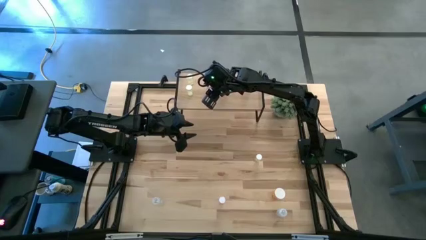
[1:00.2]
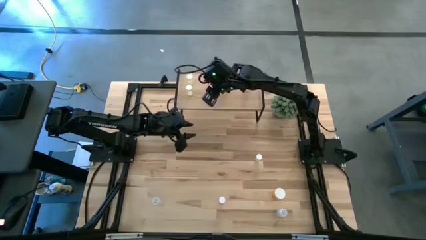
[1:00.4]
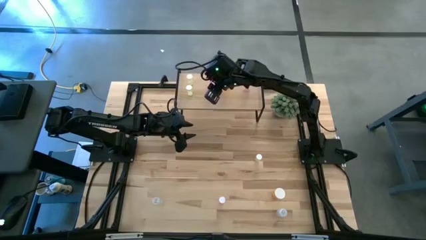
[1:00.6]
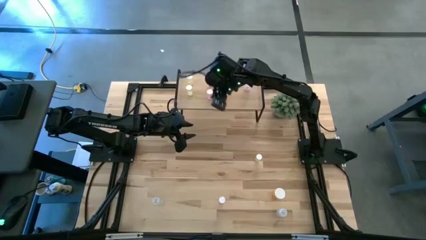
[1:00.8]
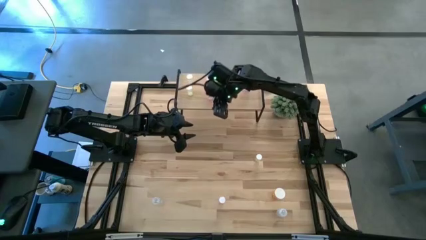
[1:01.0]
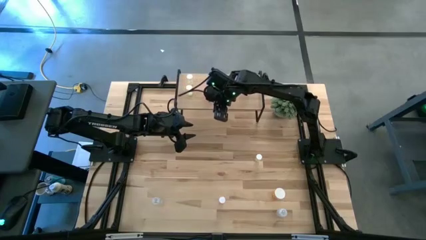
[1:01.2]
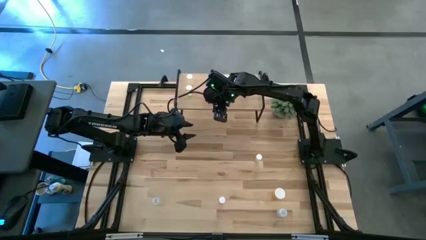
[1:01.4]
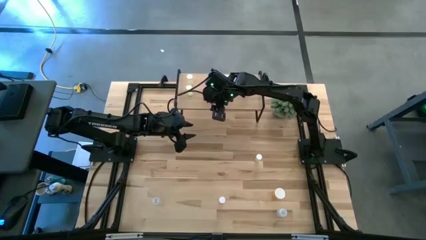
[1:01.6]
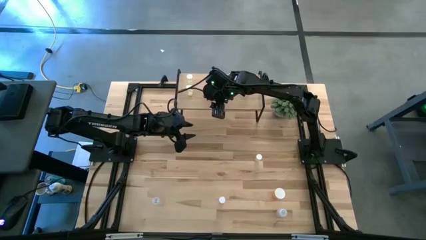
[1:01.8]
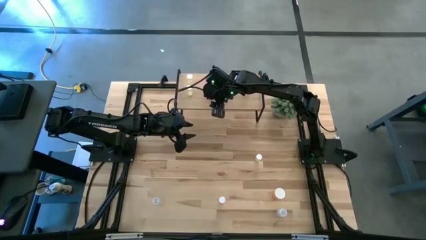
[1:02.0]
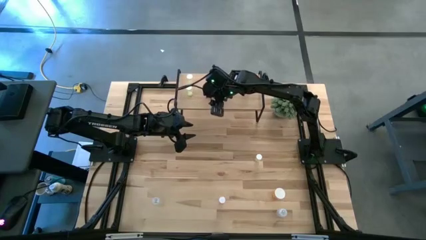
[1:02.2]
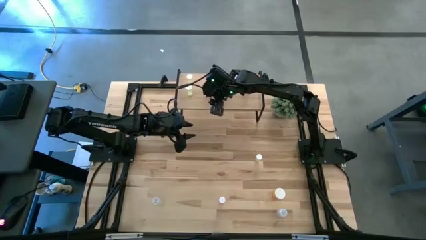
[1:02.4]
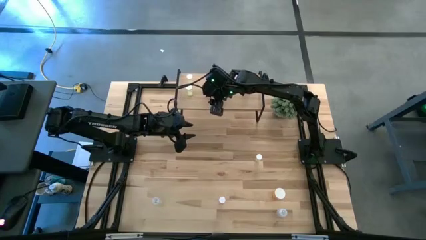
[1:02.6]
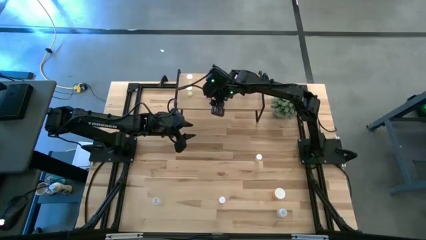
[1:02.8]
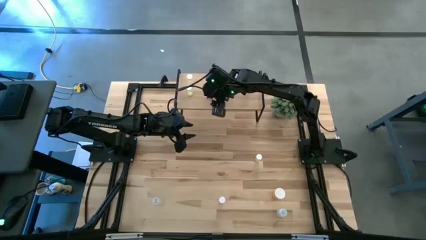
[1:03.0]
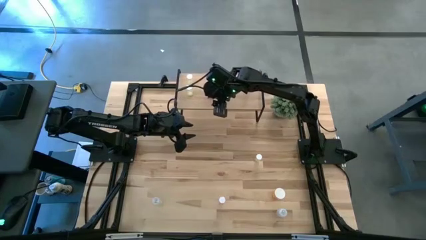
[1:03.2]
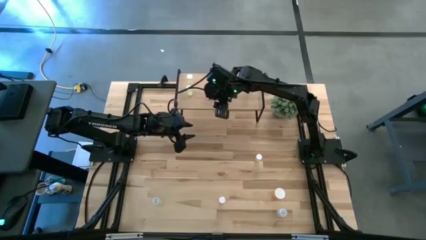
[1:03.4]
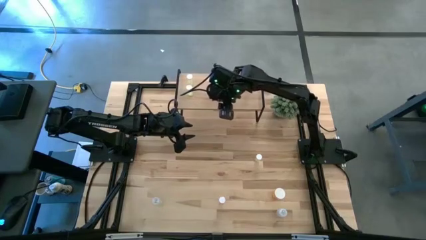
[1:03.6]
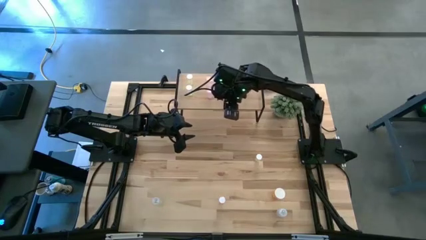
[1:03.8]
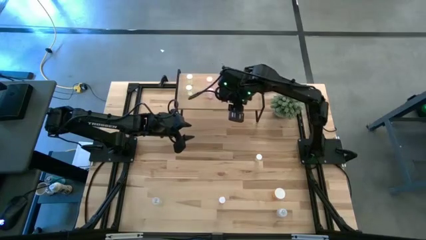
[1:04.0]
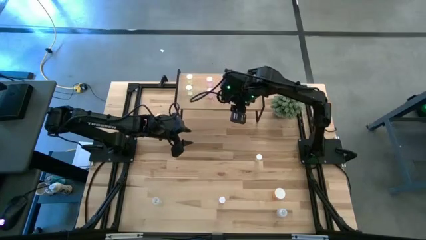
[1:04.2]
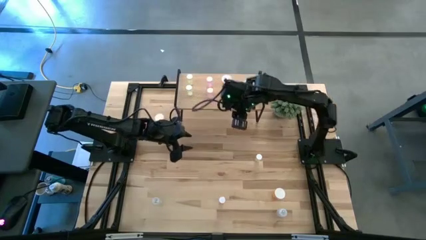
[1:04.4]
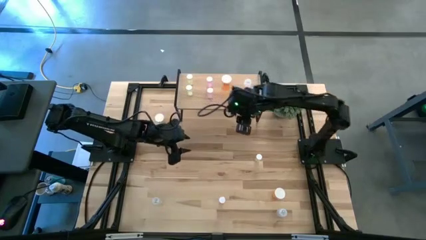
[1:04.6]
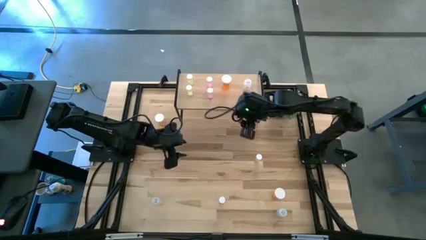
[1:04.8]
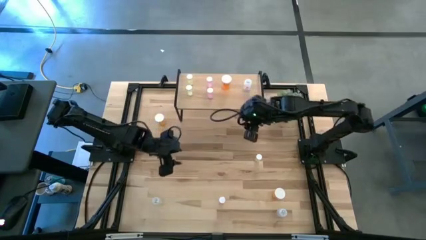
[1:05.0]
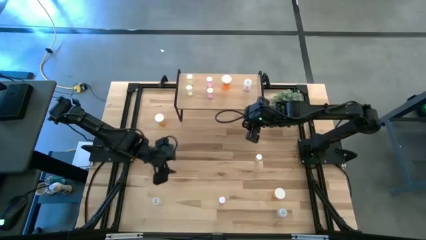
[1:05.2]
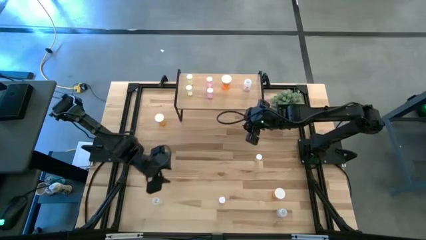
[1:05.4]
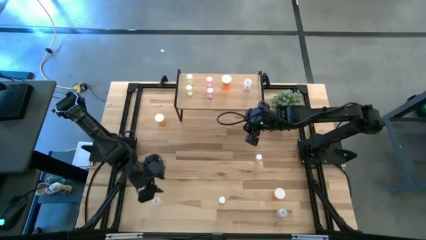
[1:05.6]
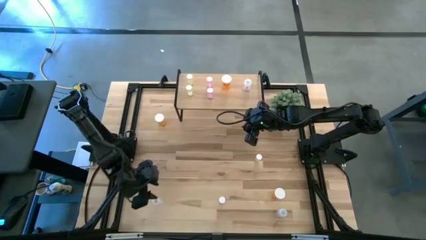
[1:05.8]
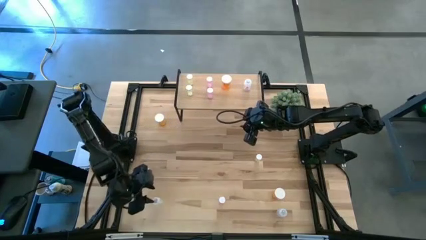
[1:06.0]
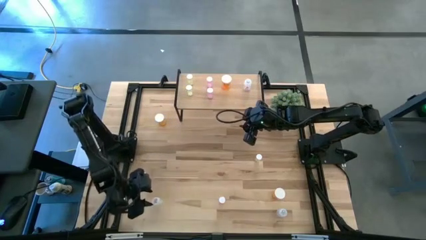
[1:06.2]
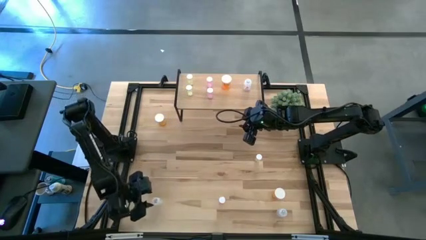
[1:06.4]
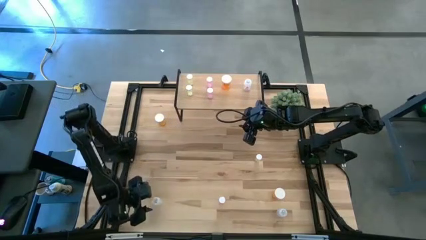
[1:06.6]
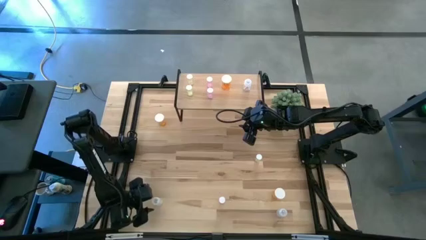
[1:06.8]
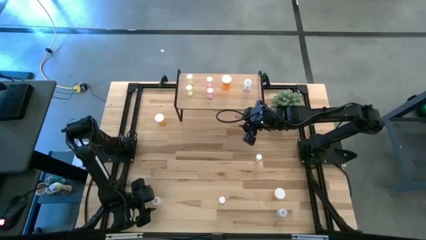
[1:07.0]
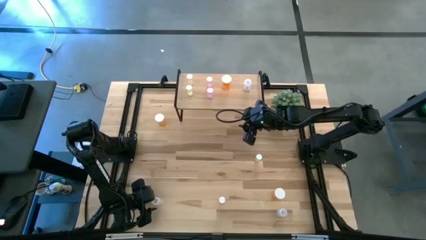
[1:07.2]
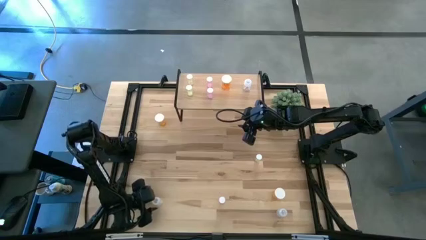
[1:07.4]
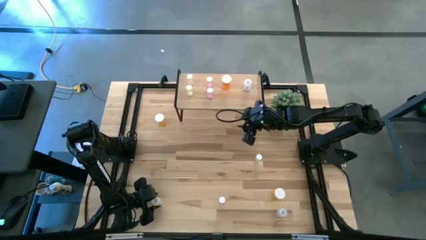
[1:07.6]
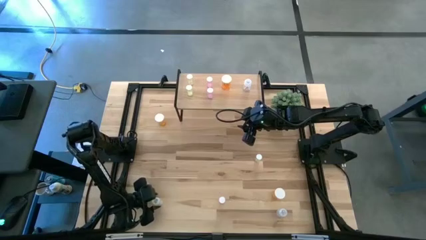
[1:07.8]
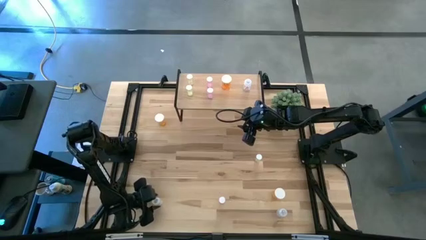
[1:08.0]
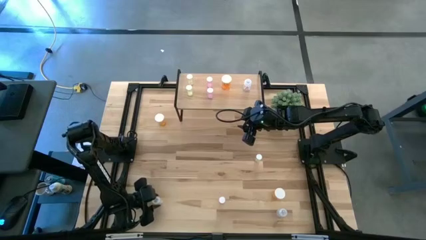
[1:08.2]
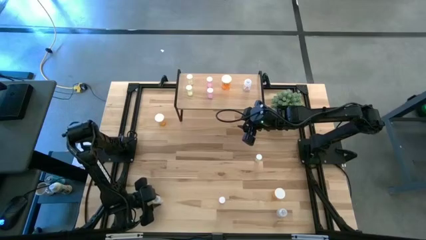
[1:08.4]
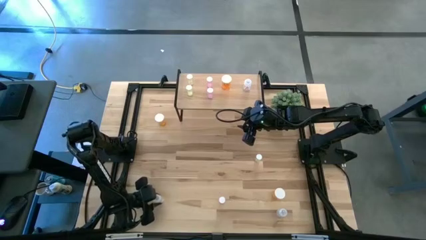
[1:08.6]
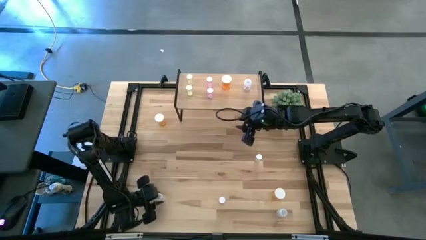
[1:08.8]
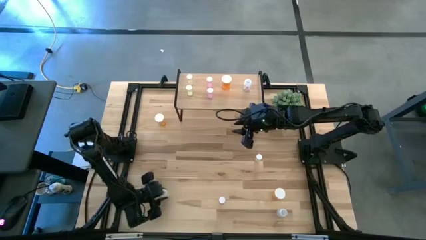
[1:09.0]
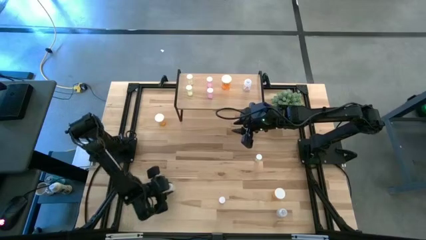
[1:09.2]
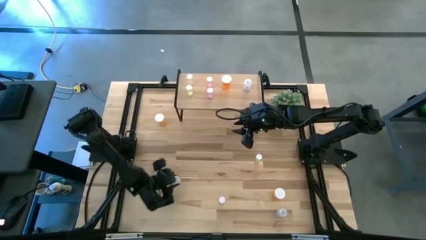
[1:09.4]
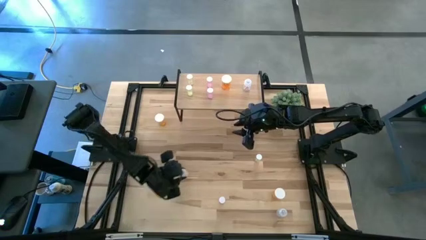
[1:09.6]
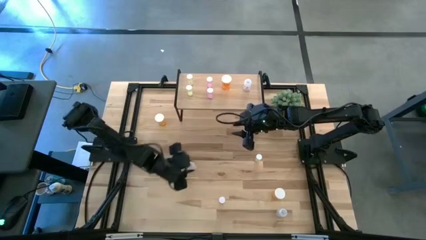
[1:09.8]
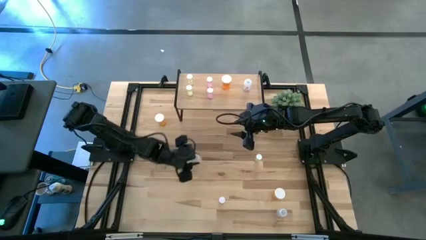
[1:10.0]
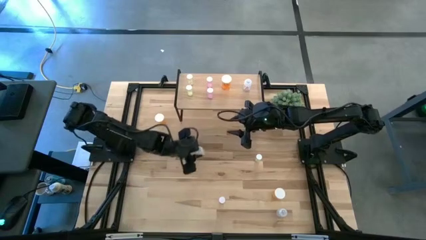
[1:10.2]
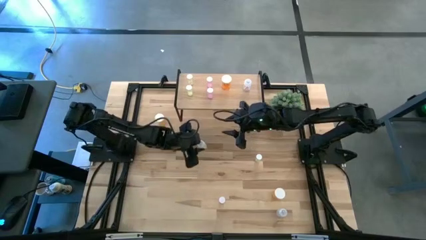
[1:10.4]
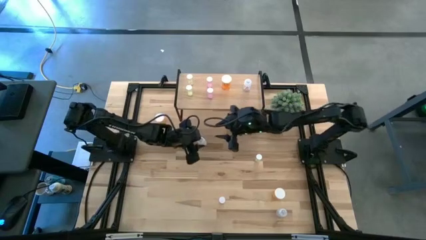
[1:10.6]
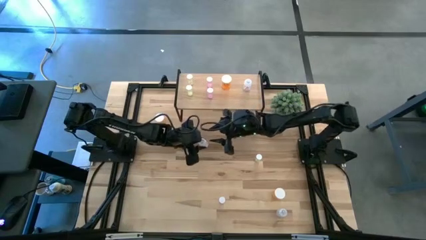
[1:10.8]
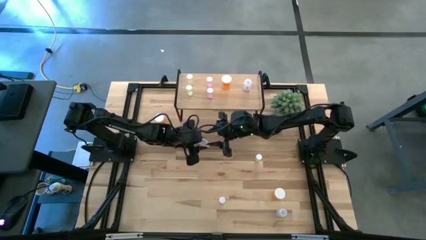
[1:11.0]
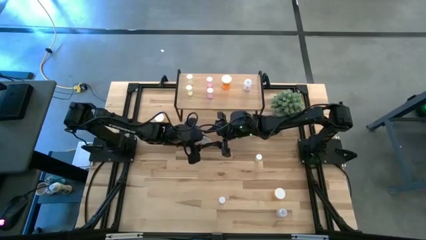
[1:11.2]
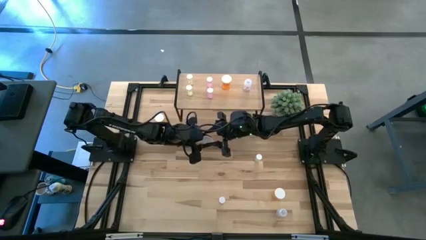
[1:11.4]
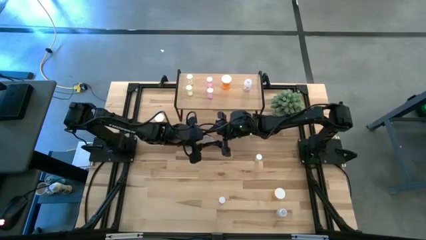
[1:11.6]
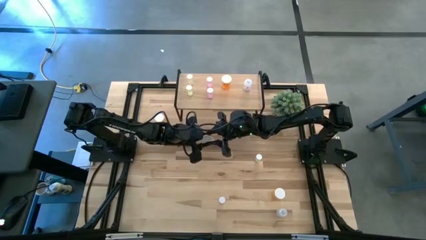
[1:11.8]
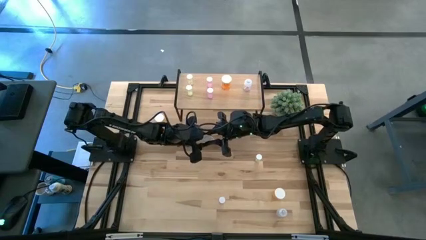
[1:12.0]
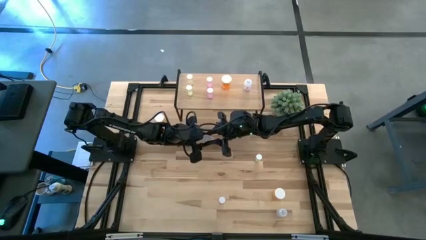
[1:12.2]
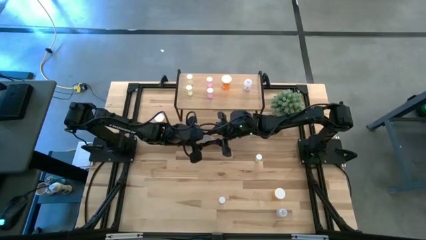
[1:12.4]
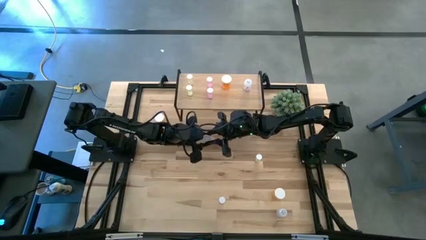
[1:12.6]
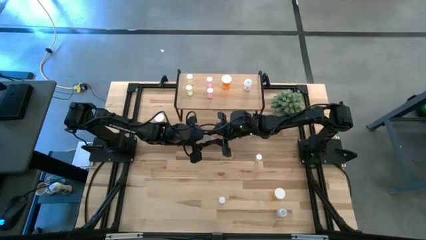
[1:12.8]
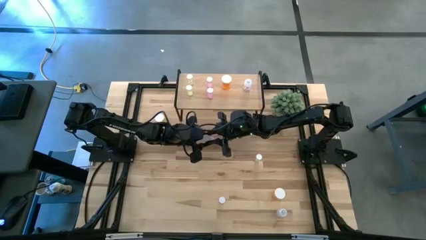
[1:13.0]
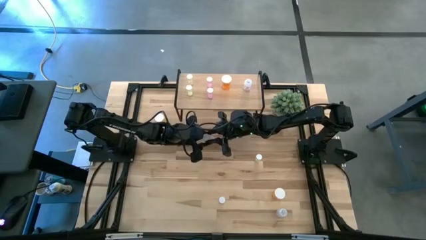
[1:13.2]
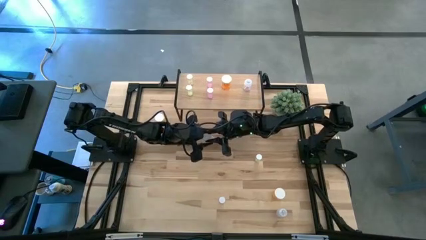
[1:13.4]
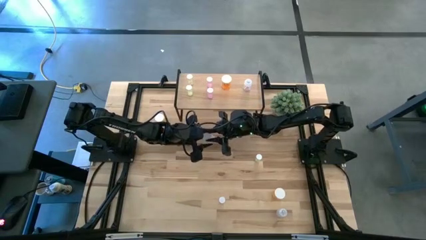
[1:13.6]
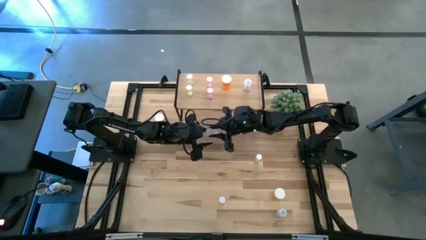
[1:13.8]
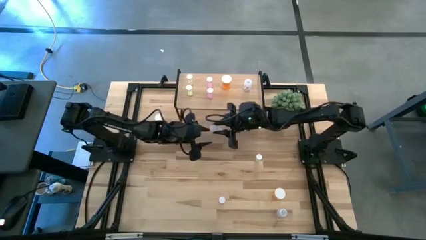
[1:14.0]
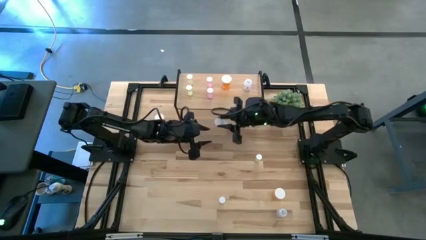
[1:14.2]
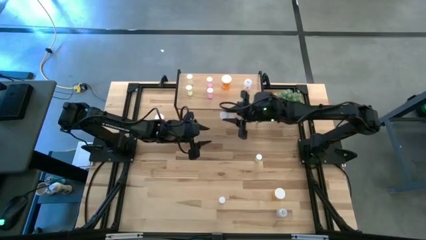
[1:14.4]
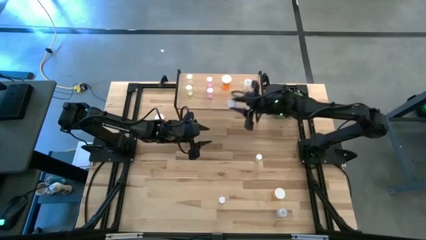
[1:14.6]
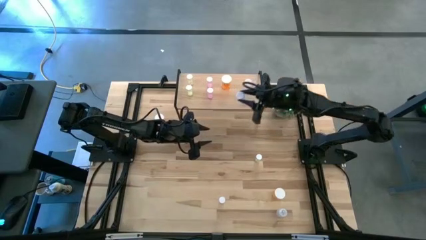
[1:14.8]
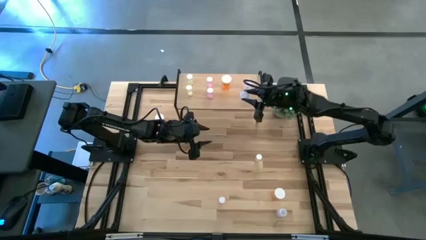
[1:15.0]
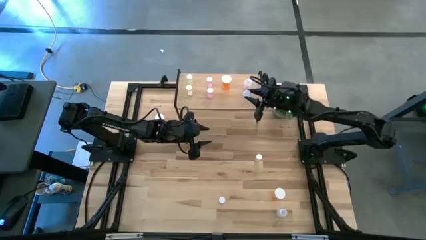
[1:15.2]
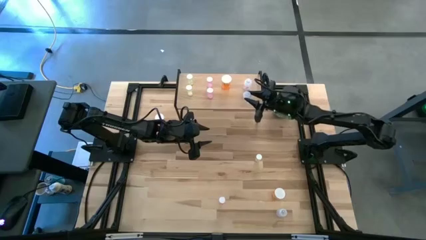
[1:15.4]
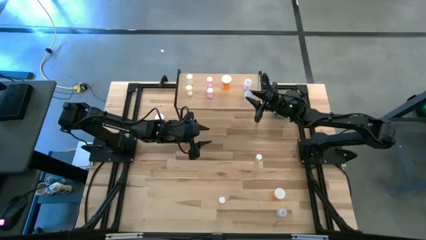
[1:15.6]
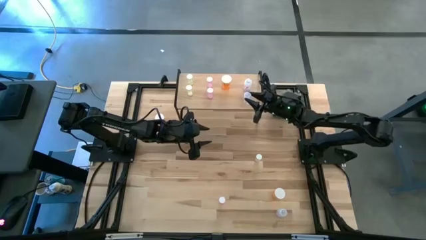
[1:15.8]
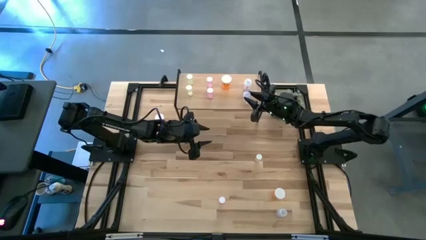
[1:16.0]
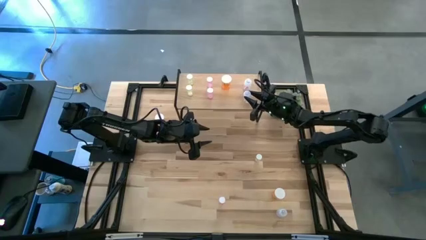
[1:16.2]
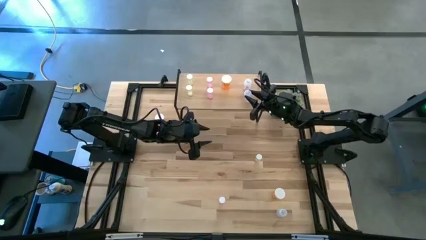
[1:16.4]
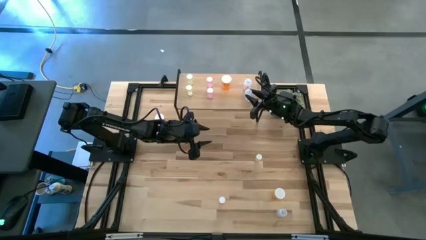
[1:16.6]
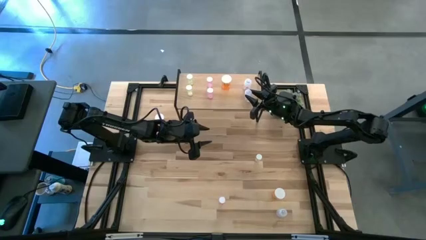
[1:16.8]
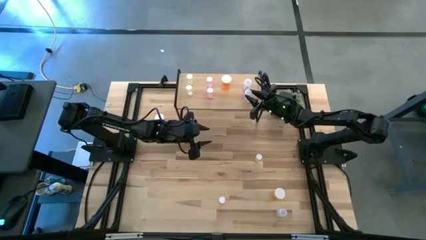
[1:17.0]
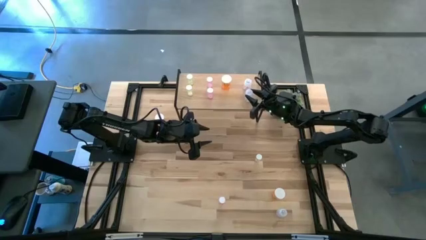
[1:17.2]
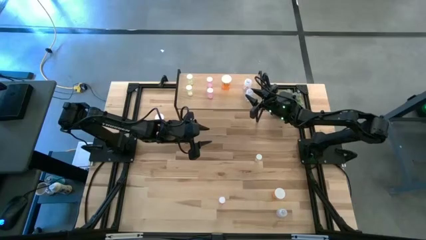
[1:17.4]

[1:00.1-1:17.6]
Task: Pick and place medicine bottles onto shelf by color
Put the left transparent pill bottle aligned with the other transparent pill bottle on the shelf
